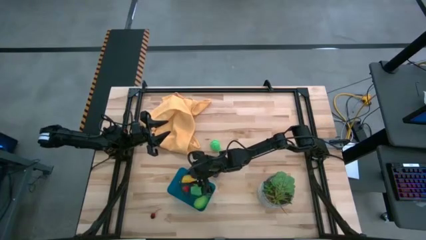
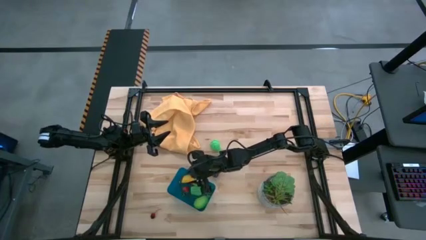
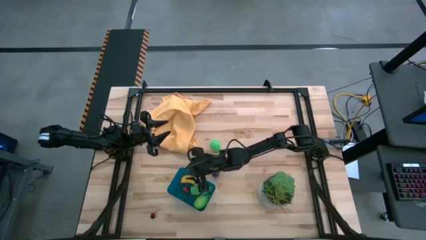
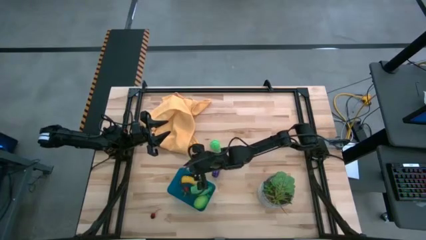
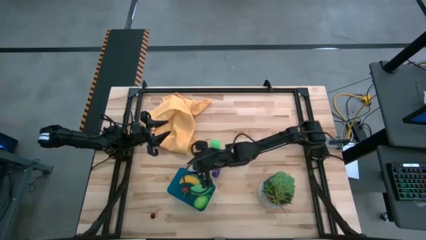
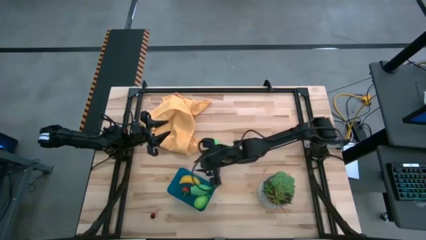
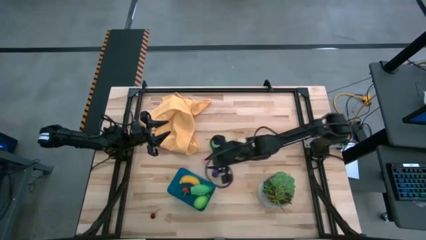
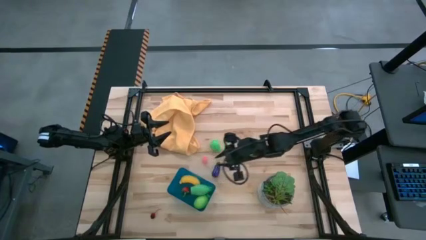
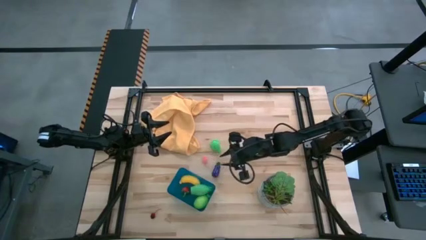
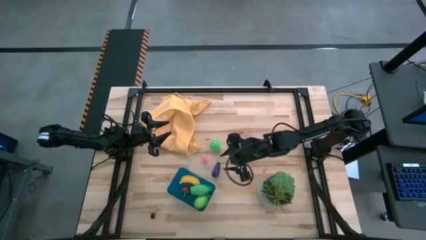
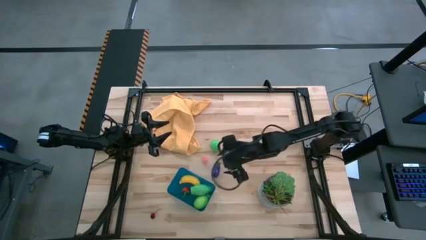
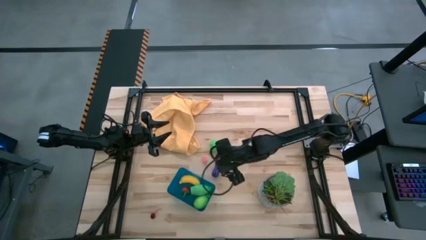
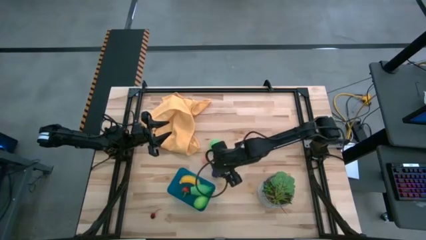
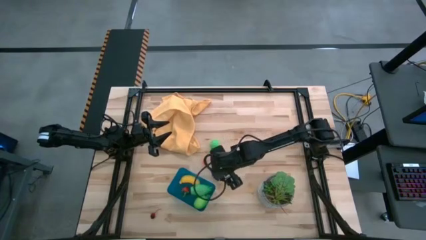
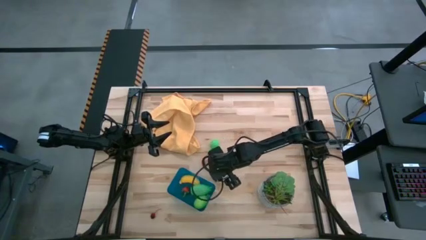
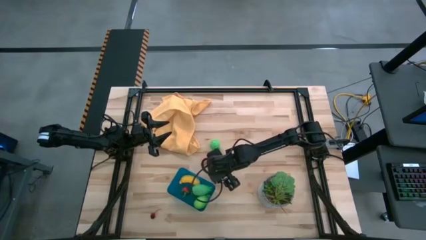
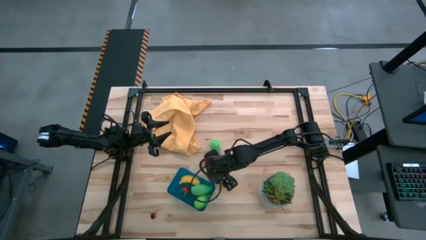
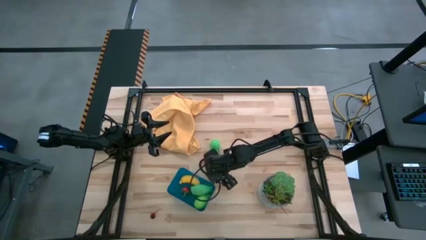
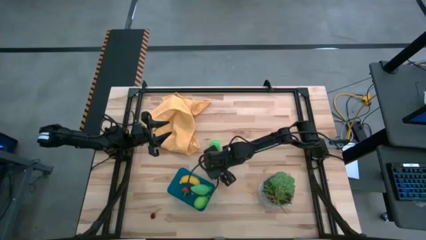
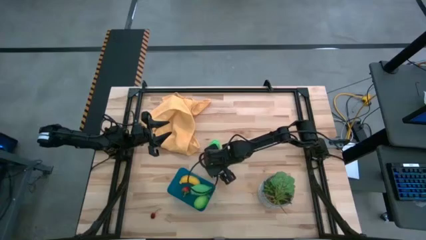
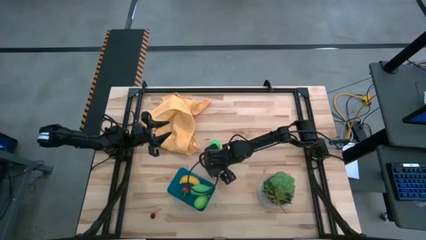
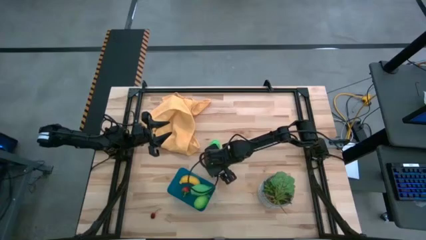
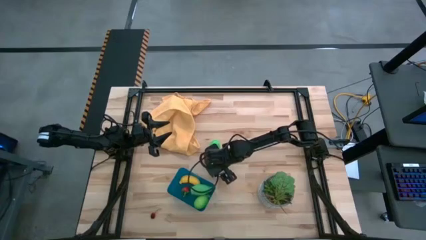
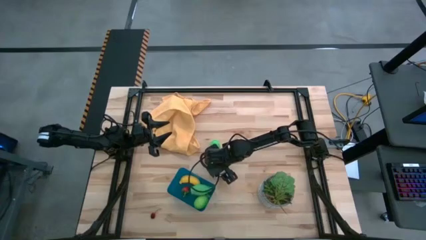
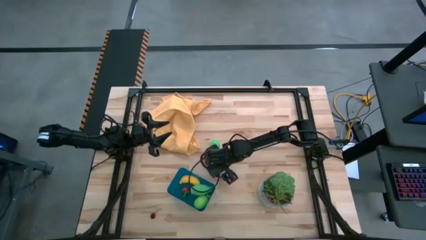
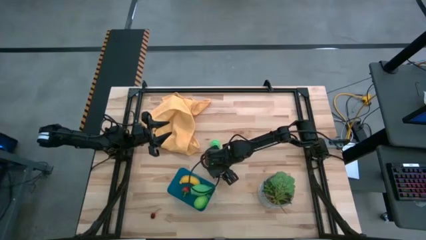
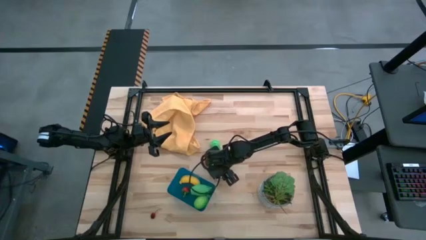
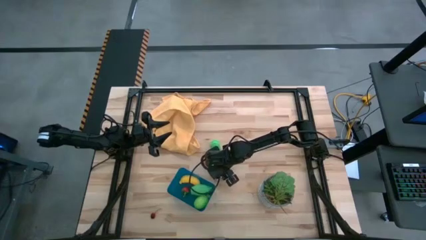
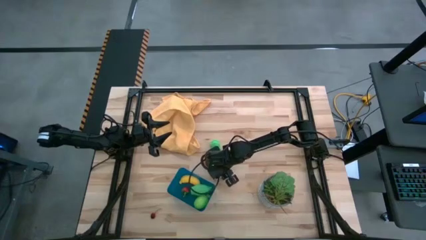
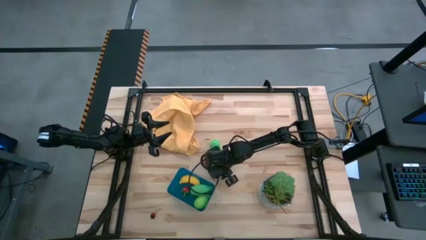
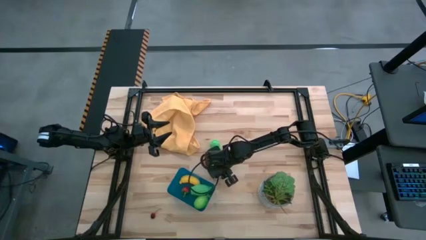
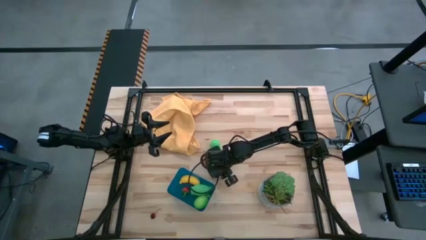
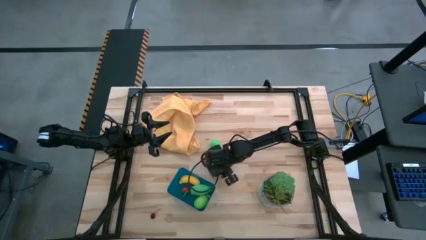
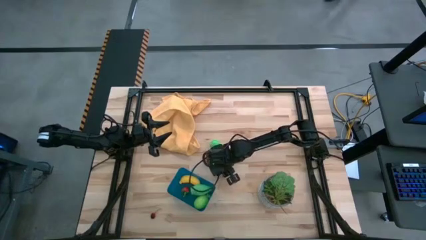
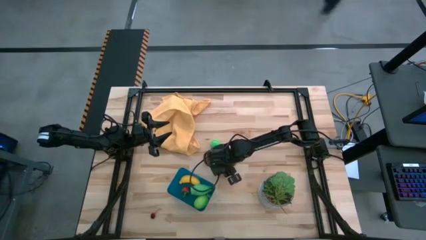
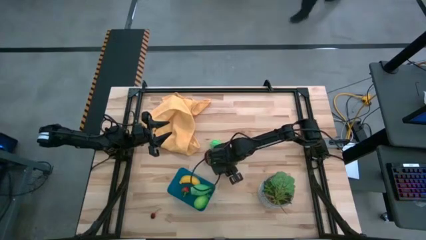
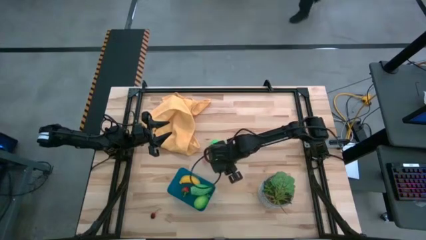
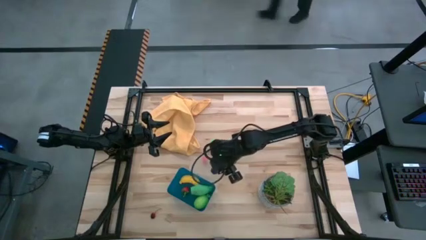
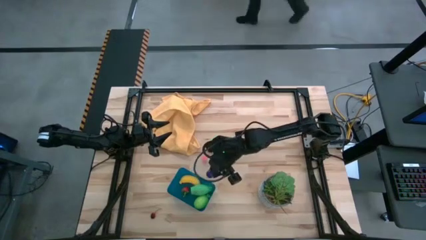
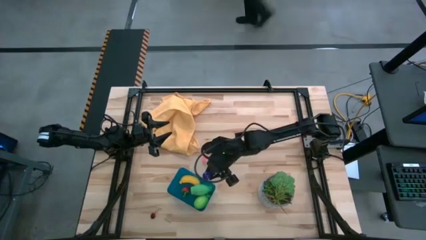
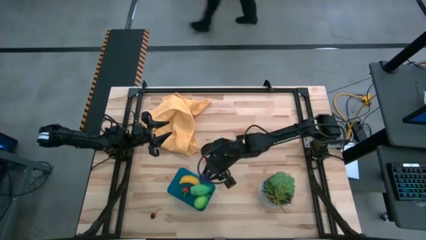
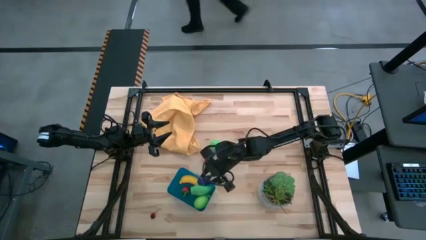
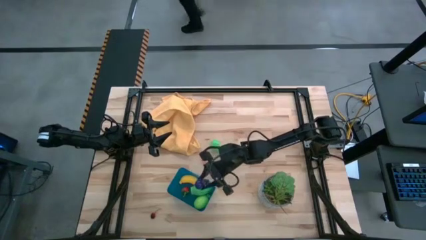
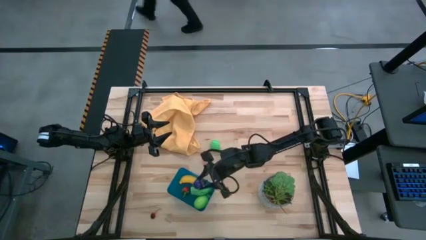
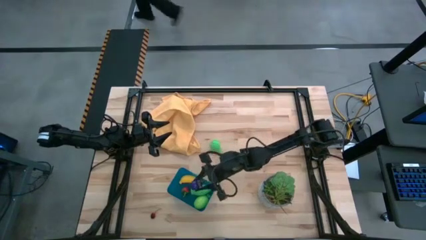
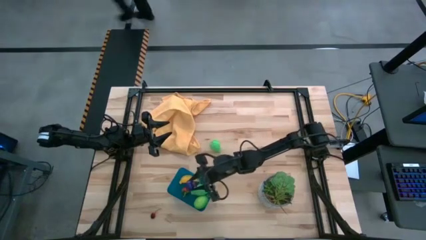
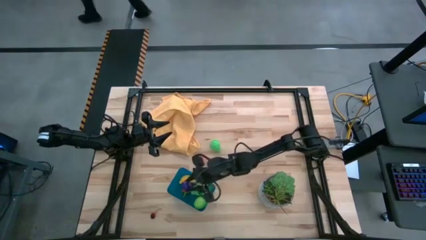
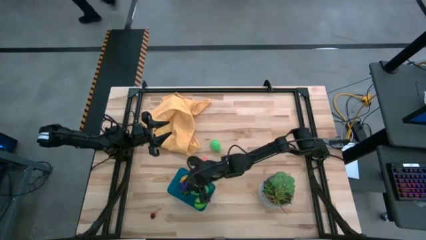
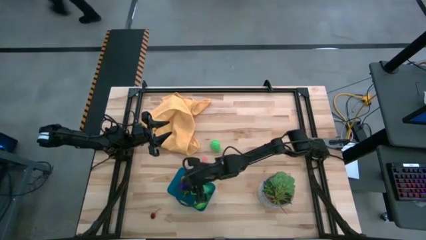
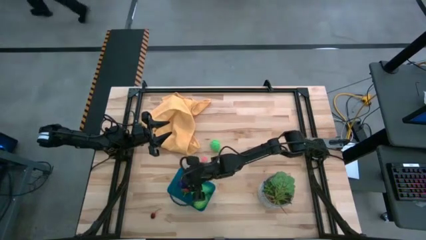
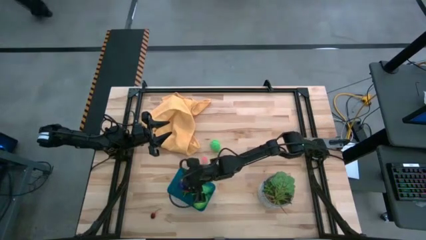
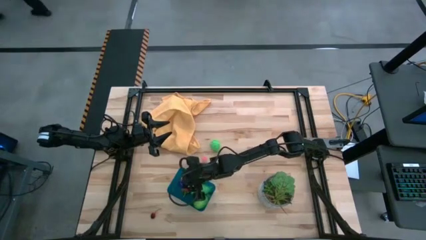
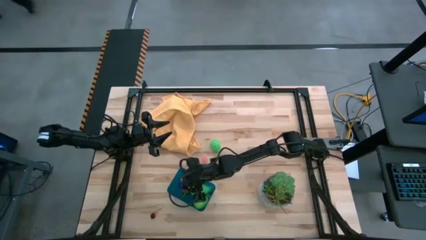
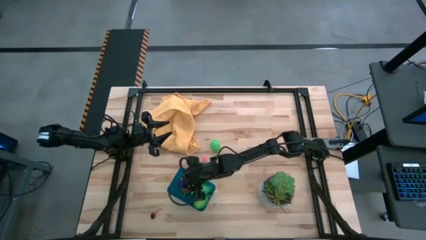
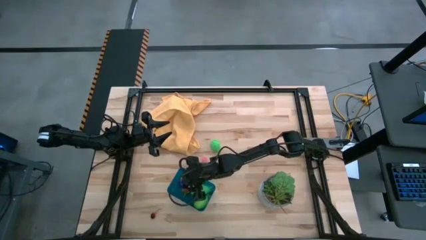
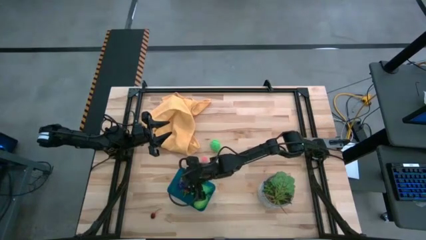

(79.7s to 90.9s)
Task: Pick and placing Produce into tupperware
Put the eggplant into the blue bin

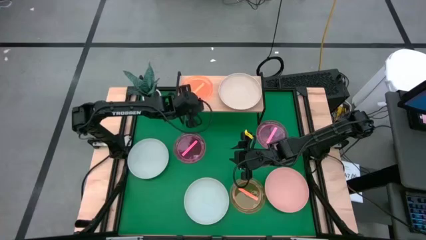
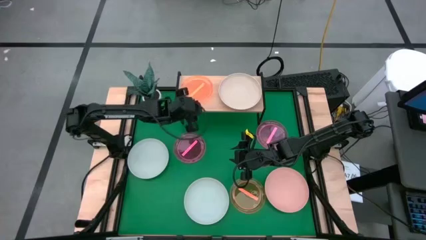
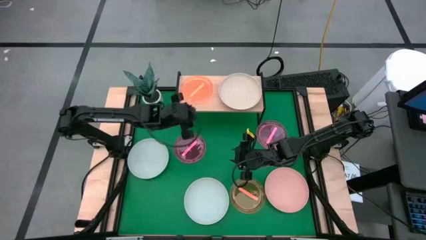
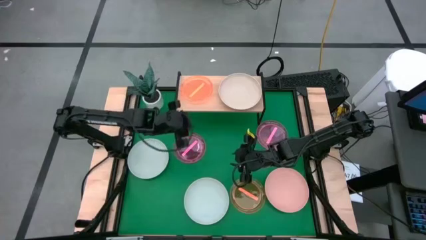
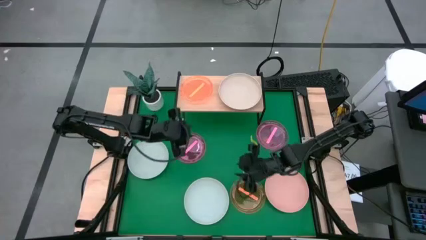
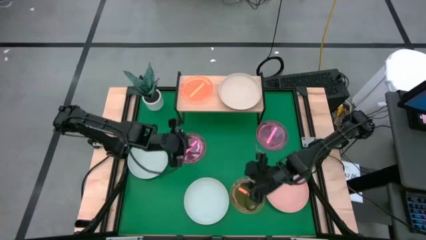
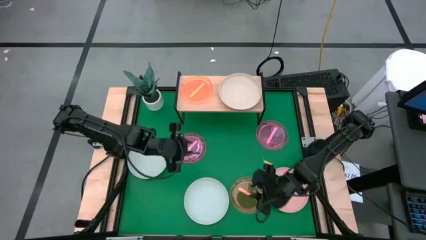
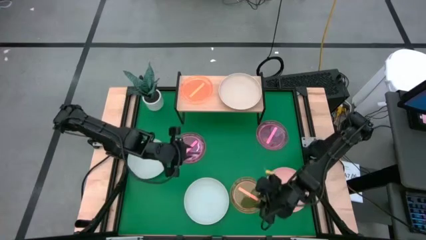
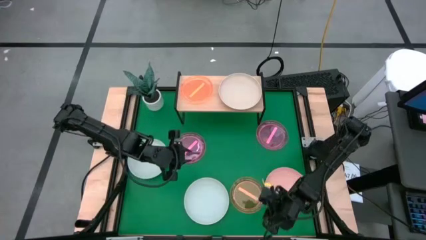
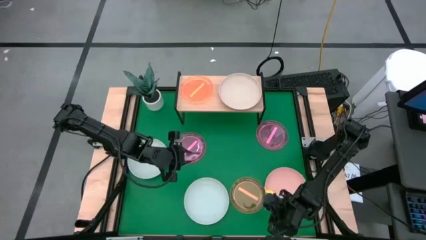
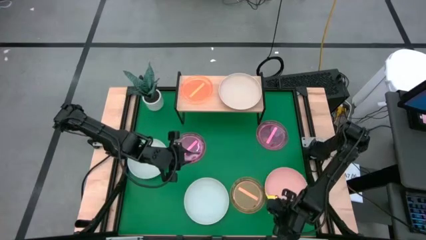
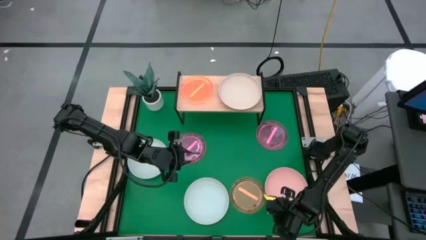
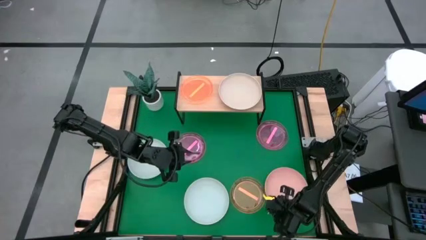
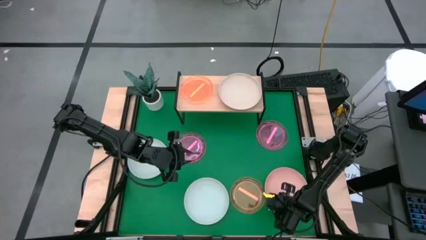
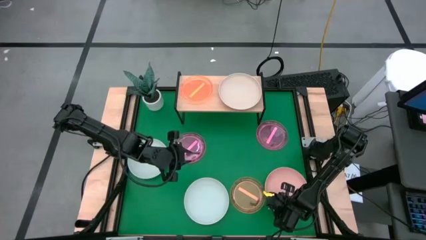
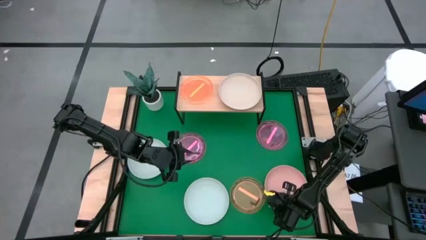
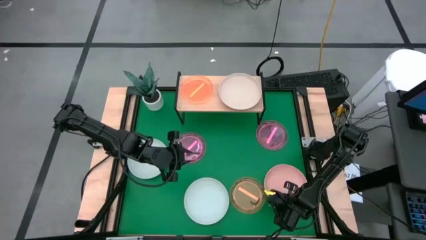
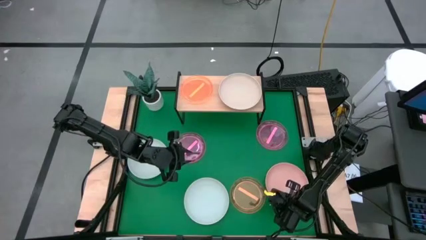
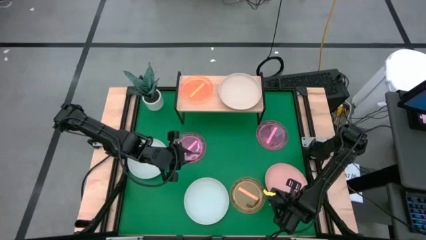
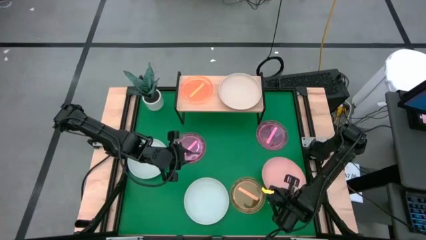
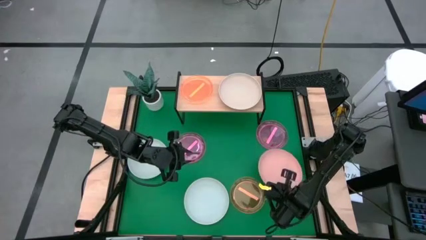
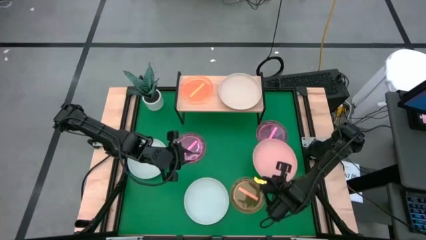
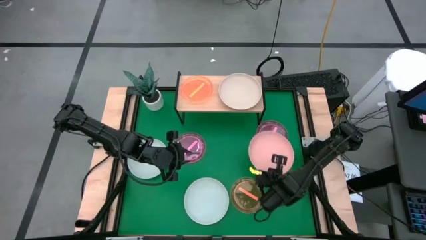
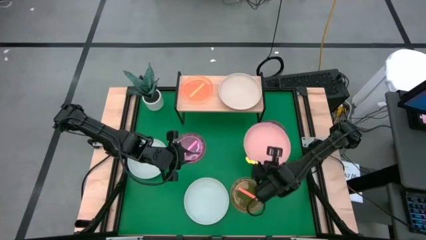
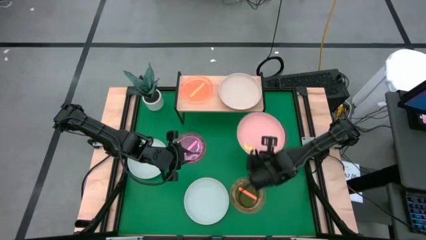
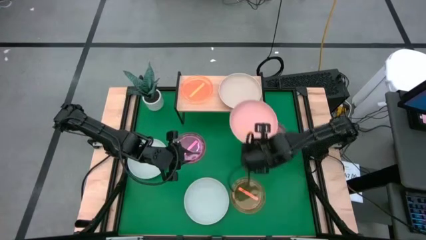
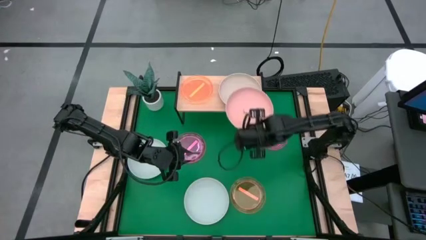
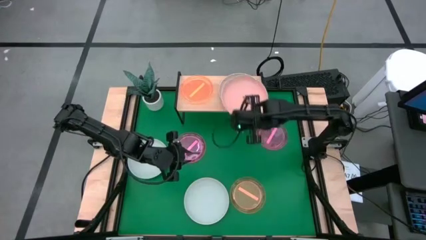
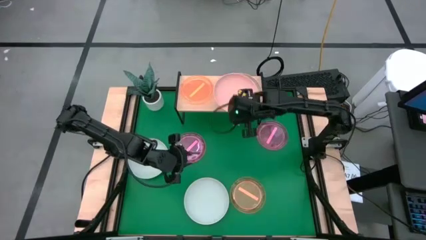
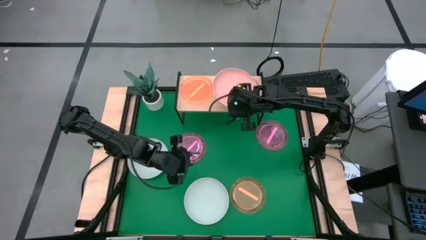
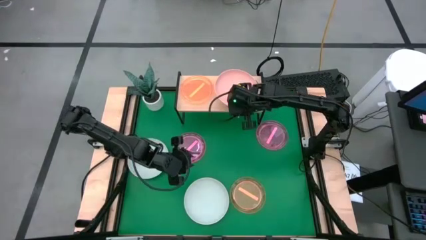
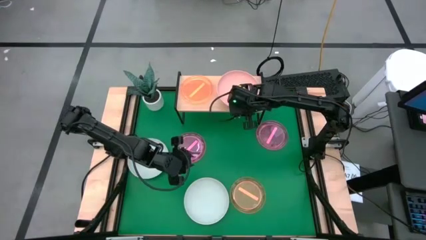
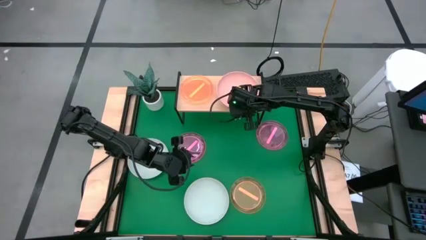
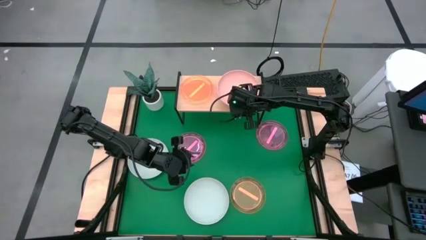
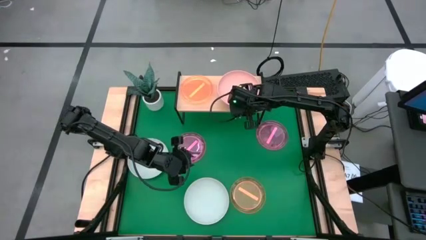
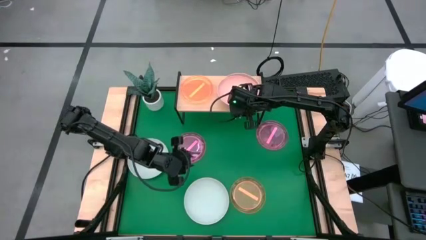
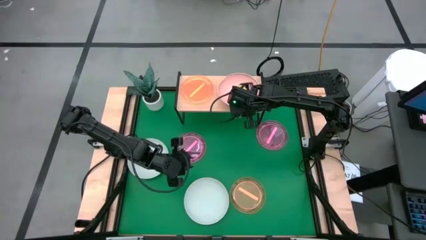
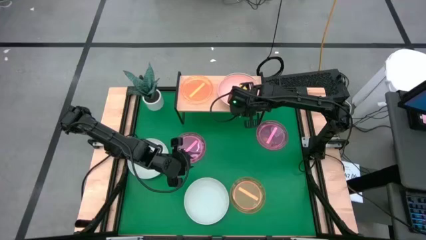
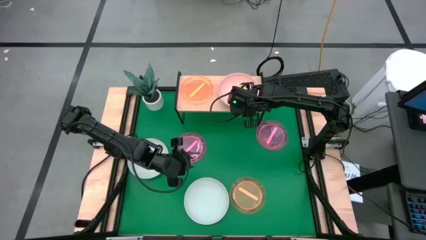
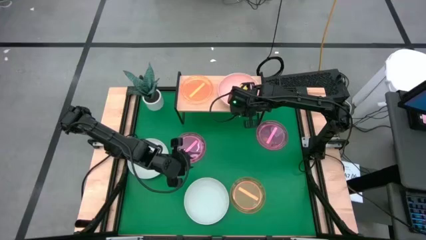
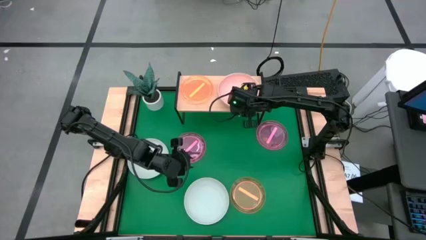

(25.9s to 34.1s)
Task: Place and stack plates onto a shelf
Stack the pink plate on top of the light brown plate on the shelf
